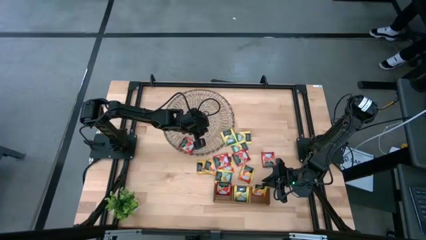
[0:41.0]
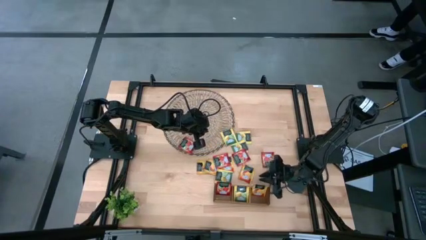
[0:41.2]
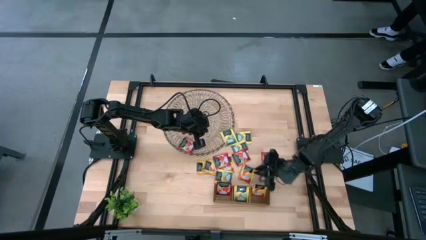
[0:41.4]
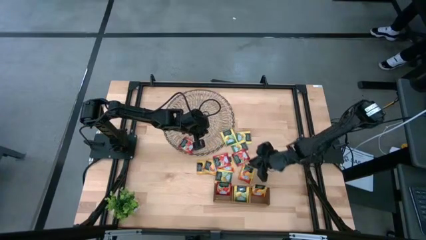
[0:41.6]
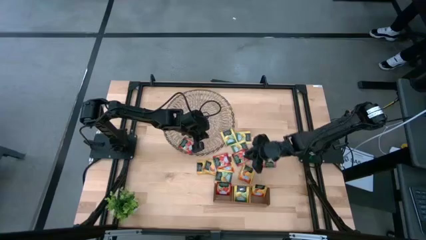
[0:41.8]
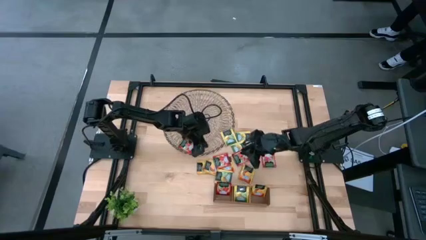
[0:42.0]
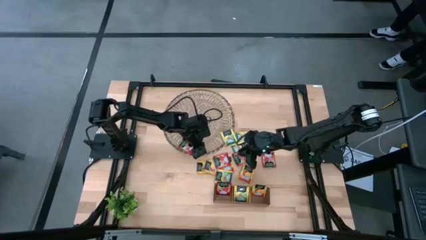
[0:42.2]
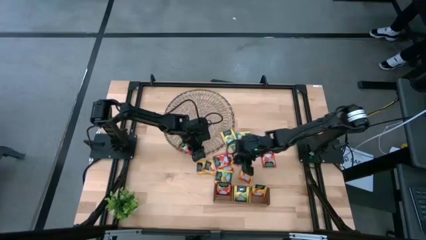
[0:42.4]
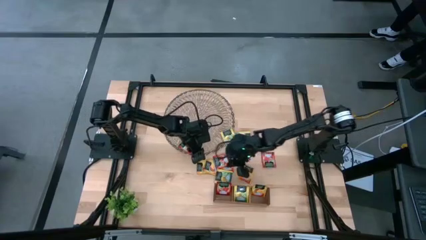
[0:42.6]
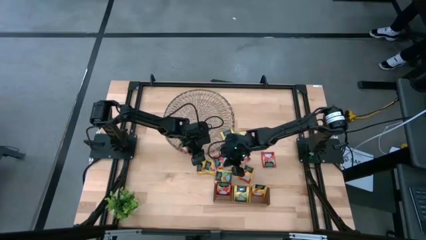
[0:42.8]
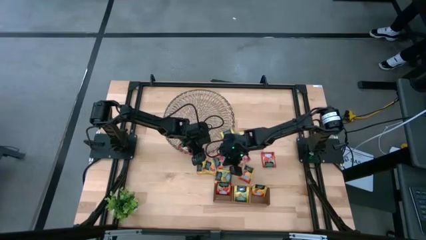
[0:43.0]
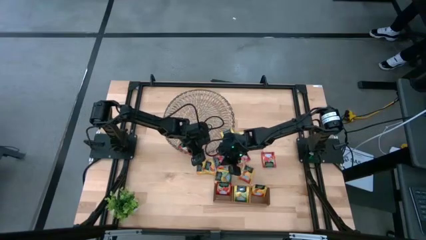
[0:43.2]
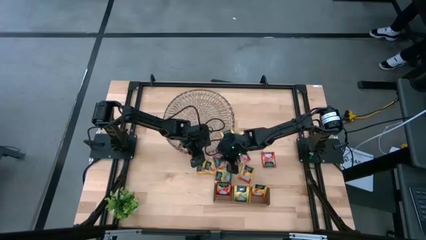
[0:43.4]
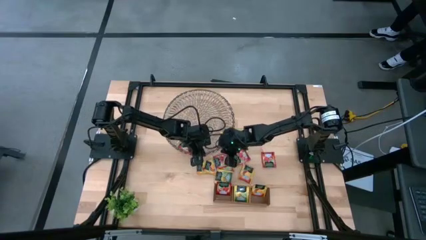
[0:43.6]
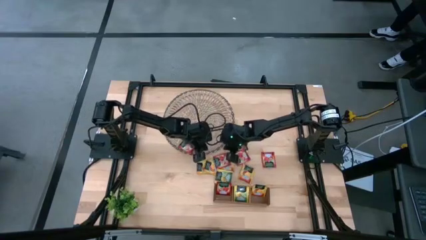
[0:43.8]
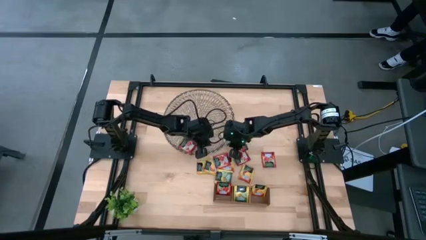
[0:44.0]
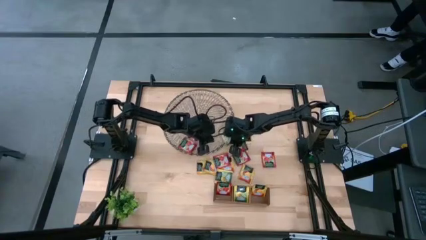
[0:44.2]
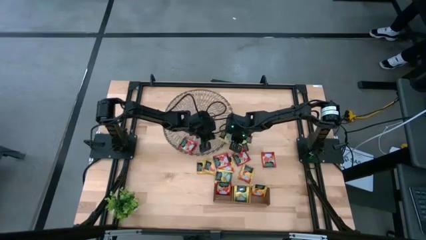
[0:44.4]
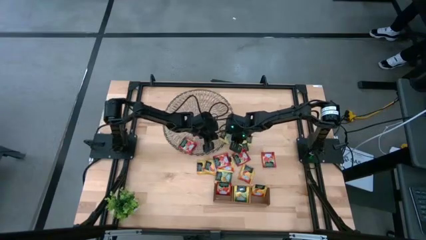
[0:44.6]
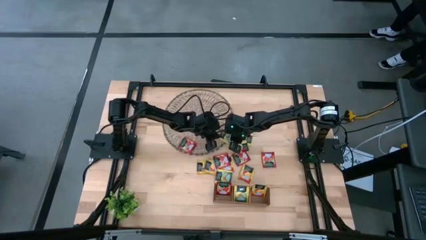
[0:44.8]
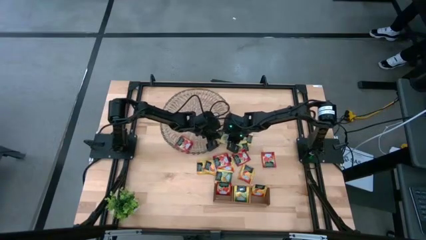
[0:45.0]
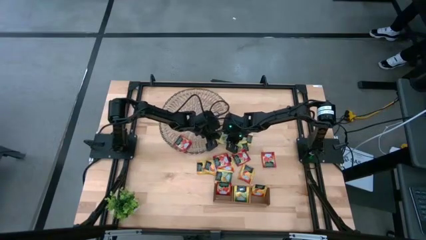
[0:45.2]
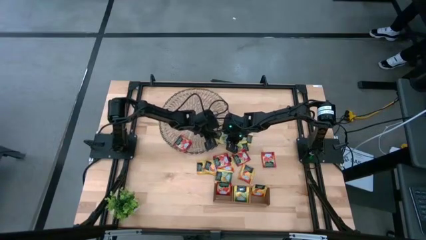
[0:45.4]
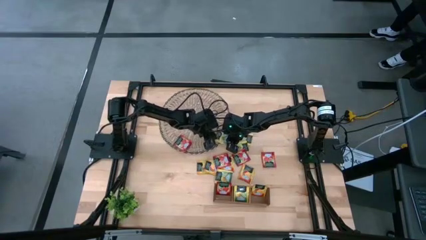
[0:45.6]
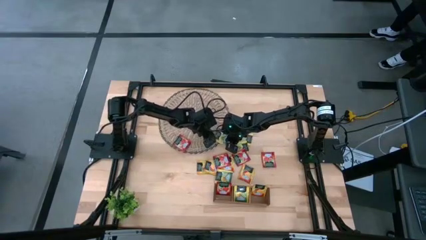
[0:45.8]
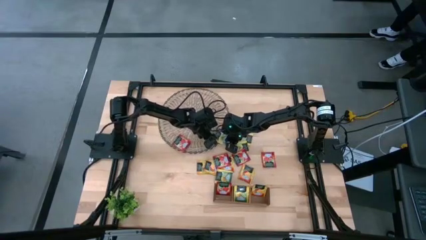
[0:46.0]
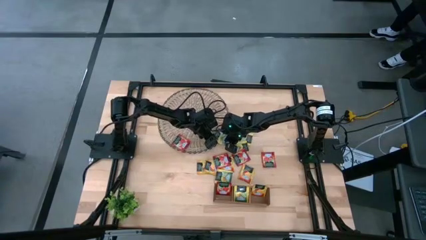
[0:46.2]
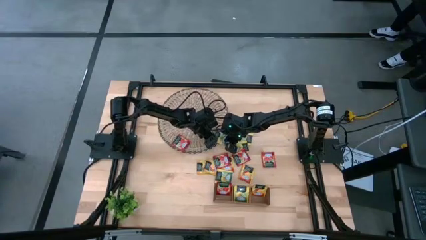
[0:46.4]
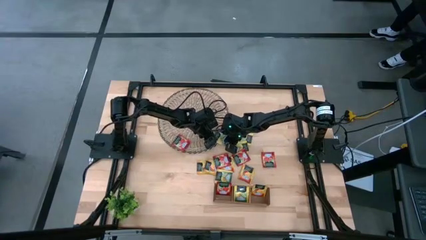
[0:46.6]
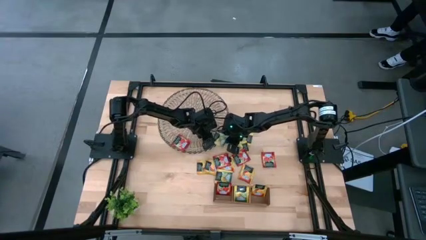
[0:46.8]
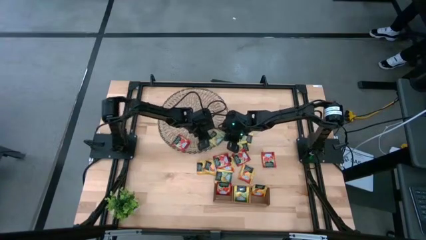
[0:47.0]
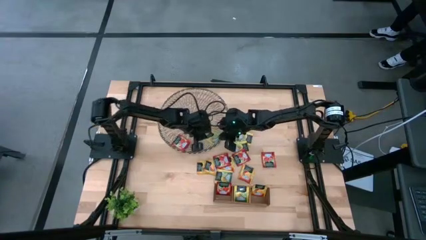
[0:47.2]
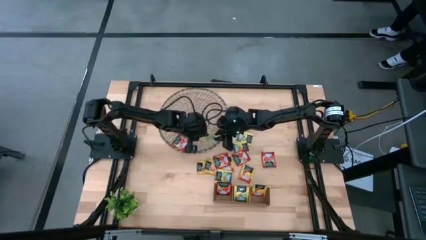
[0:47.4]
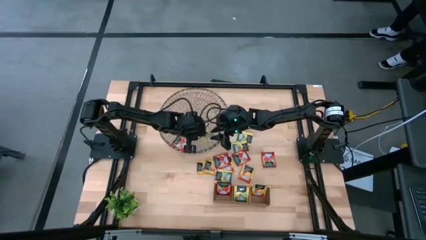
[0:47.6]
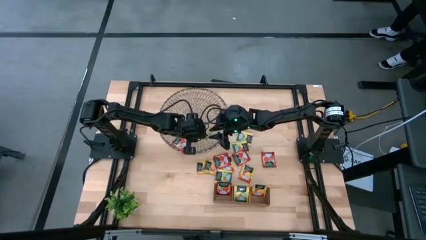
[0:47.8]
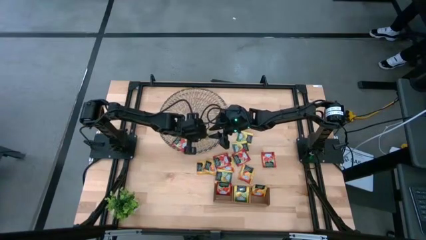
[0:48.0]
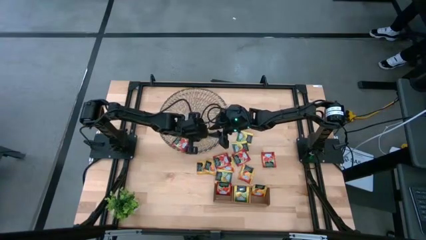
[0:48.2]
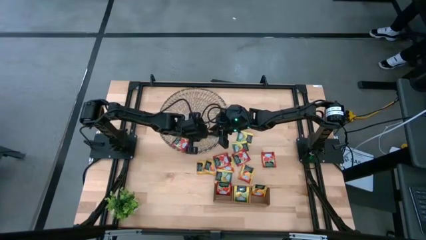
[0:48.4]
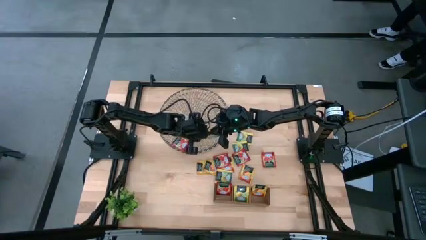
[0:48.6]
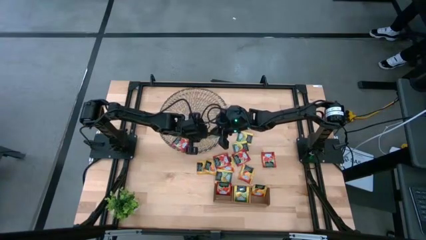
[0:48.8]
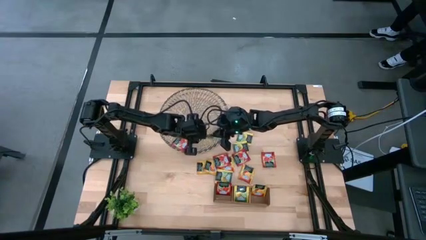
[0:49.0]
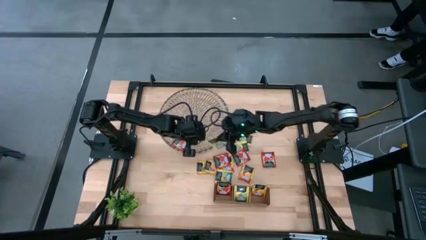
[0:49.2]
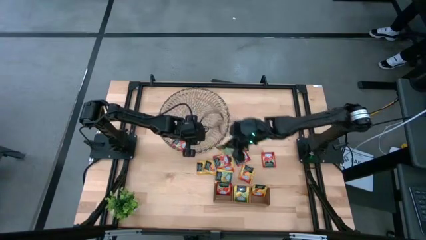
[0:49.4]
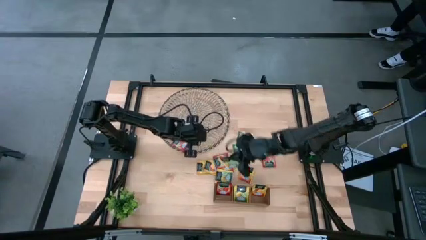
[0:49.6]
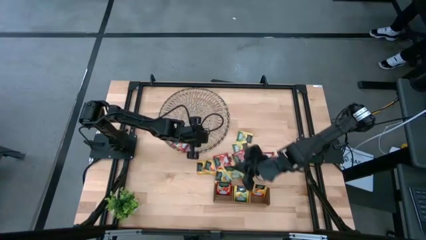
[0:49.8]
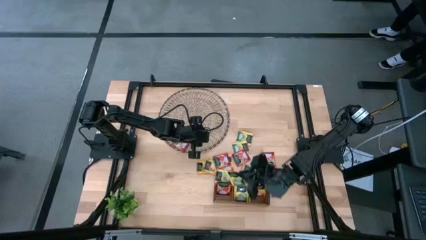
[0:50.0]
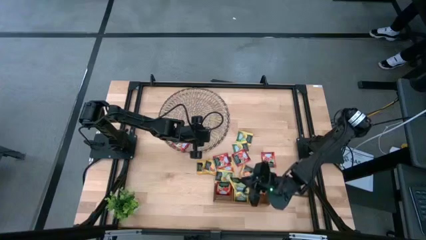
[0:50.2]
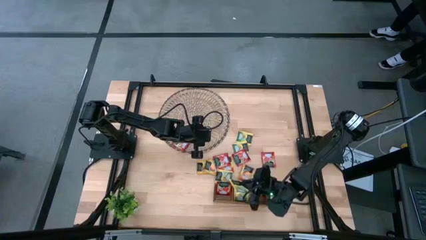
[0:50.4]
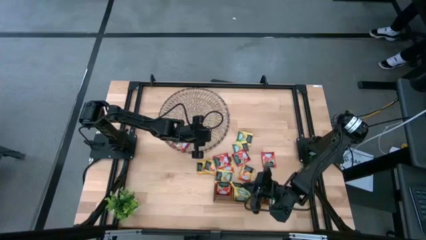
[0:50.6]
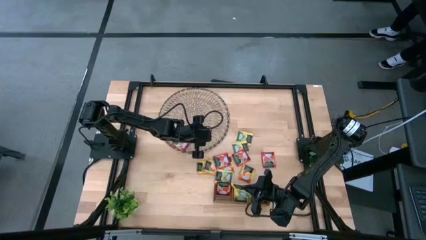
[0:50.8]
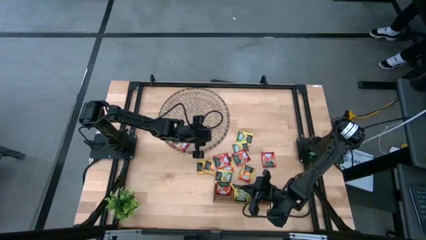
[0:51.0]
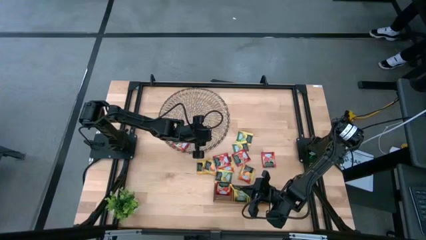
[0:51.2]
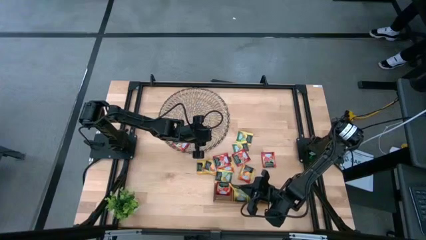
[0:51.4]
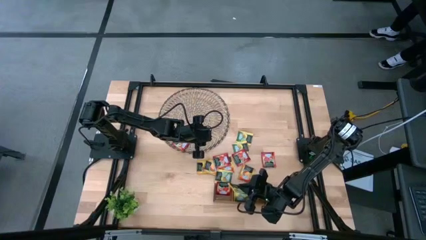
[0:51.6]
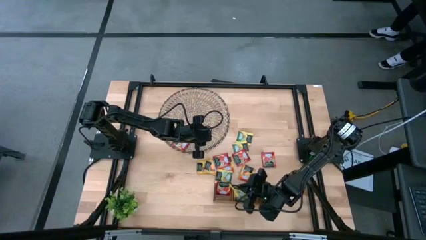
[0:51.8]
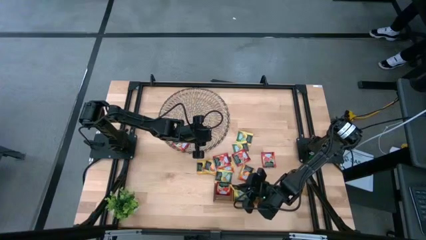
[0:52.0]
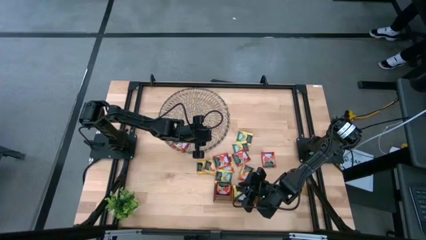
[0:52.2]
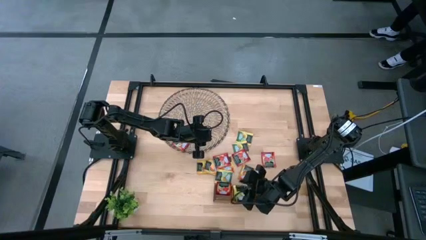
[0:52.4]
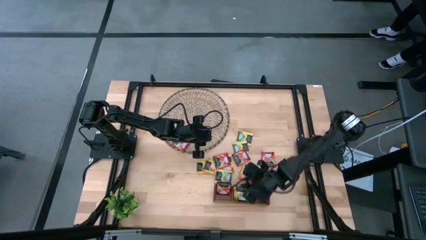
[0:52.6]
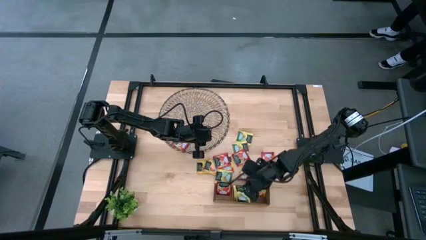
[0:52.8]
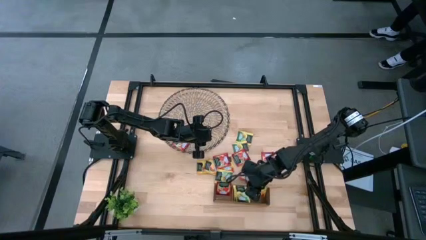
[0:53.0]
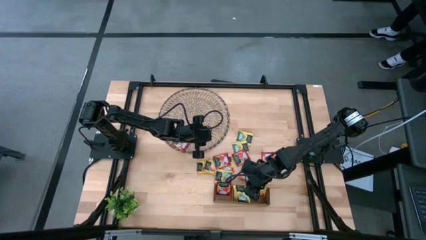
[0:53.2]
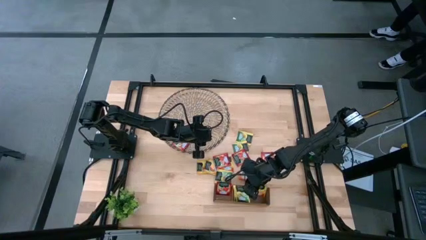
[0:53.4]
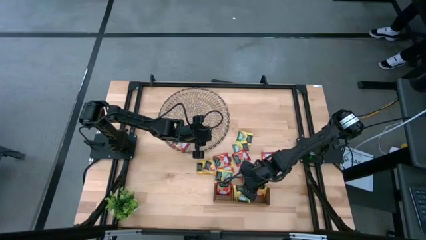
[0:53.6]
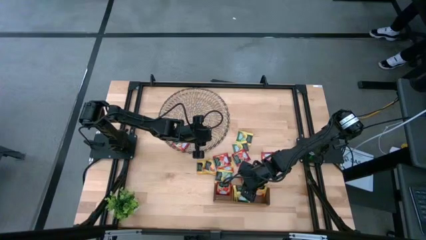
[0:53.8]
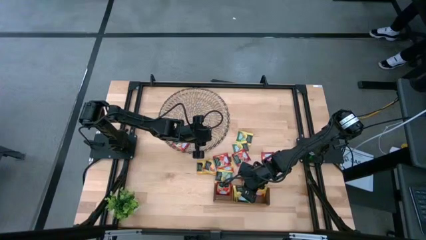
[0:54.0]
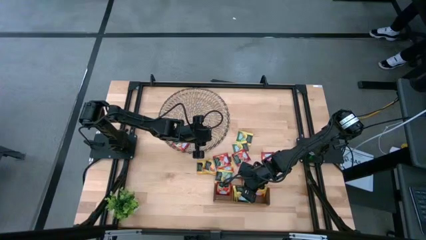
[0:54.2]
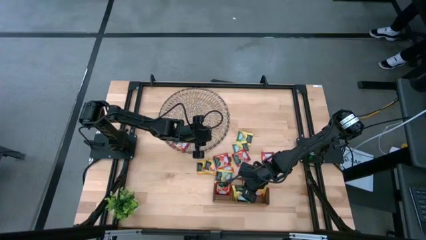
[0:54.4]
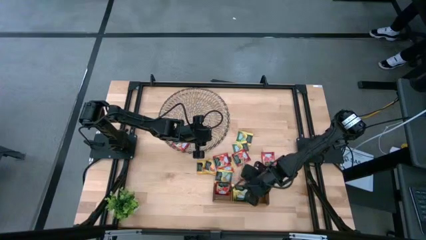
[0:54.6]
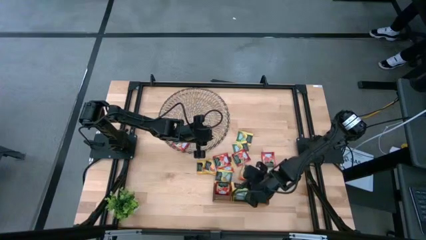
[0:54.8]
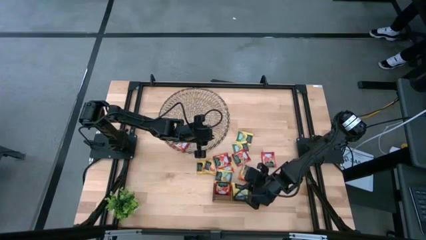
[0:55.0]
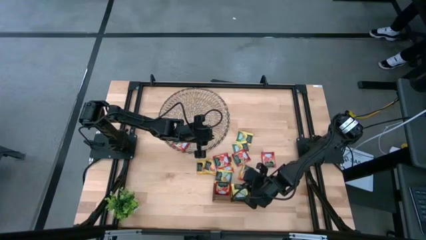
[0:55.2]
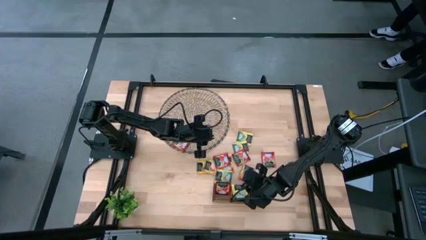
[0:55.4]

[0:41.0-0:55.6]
Task: Pick & Place Tea
Put the yellow tea bag into the middle section of the wooden organizer

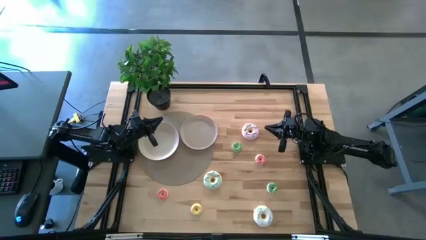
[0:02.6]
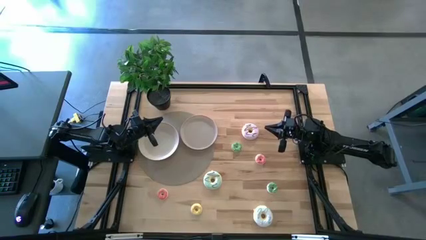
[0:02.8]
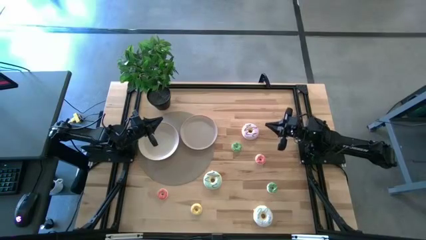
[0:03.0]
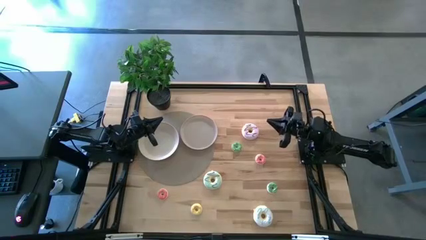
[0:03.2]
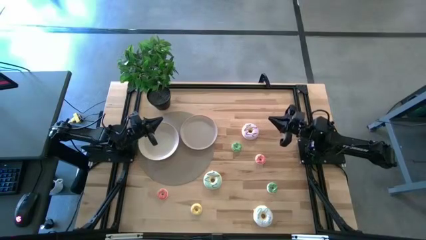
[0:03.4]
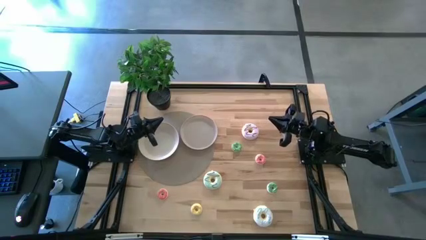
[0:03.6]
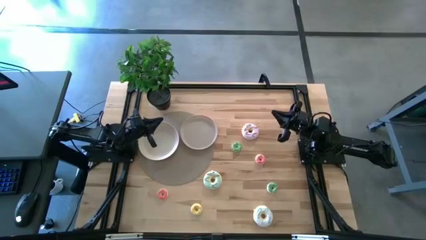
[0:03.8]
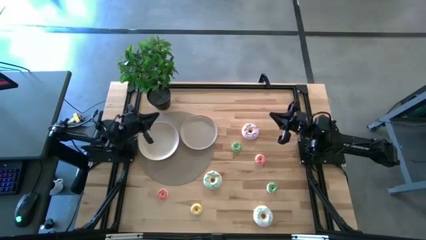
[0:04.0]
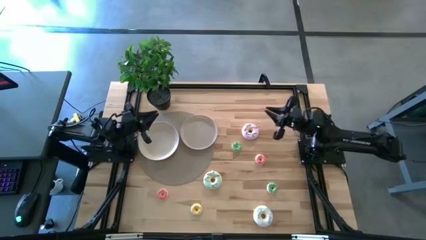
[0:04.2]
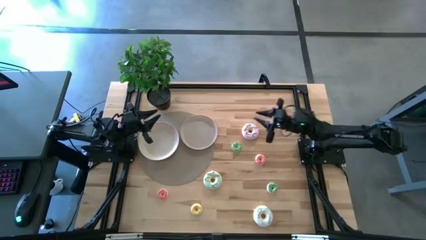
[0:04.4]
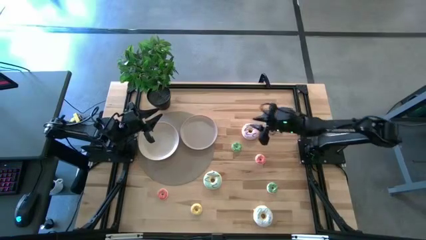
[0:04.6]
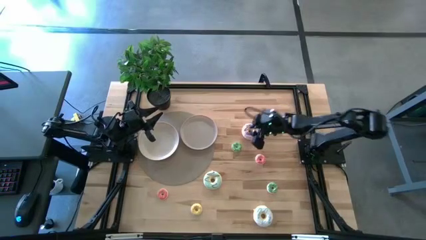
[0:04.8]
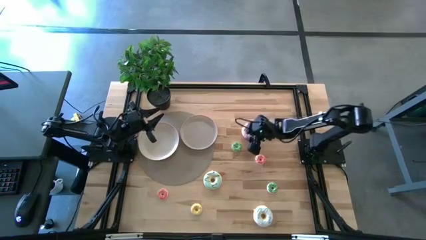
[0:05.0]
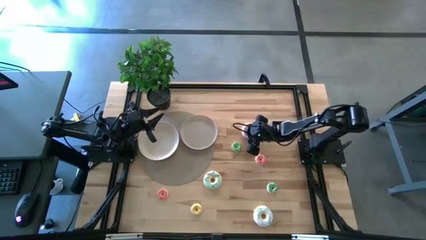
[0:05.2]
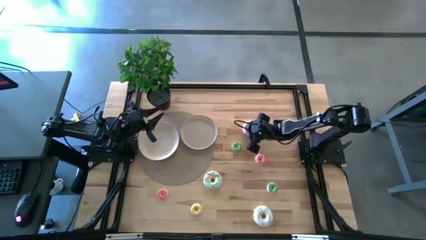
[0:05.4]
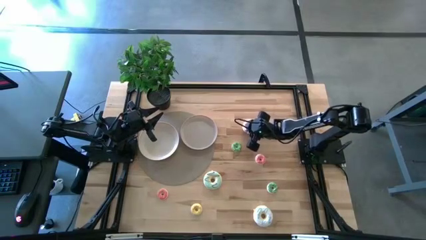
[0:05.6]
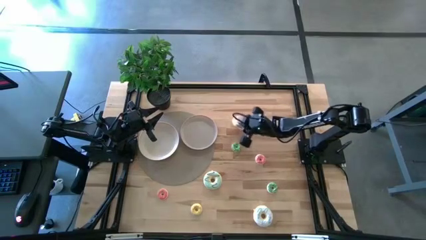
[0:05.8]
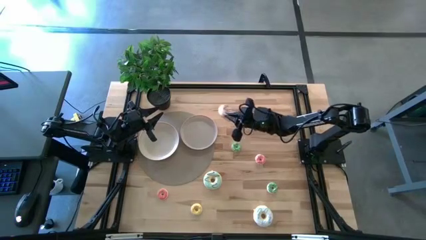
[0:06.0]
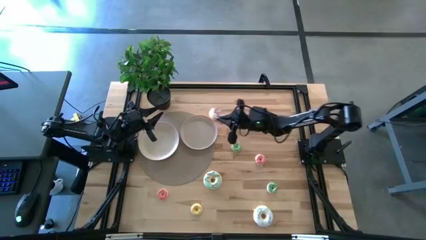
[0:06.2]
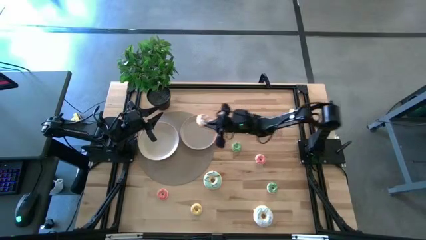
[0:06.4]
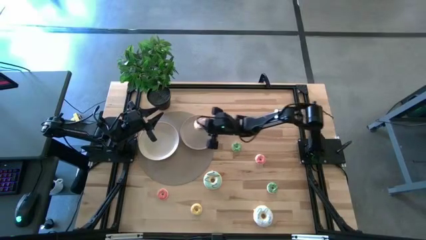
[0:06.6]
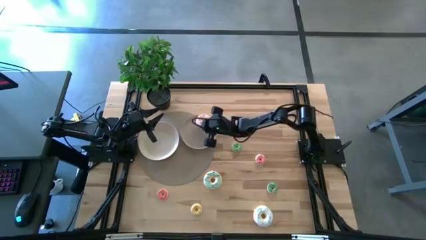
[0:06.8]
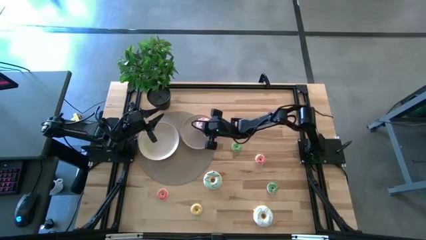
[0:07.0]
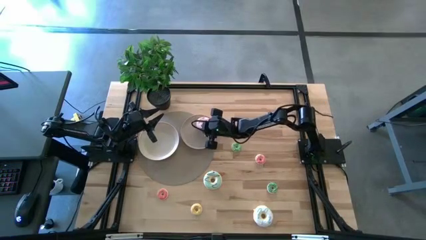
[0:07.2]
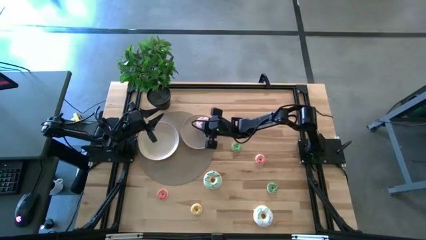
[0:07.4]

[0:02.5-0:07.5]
Task: Pick & Place donuts
Put the large purple donut on the light brown plate
